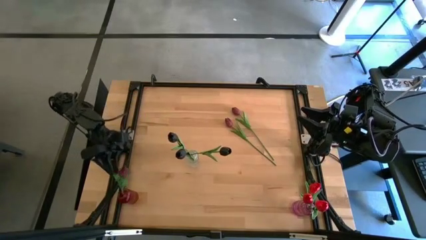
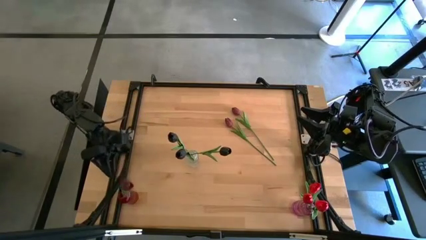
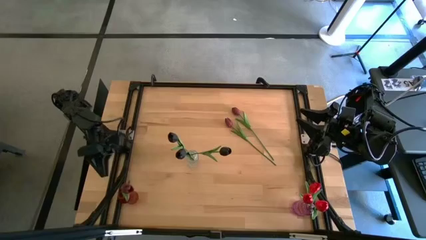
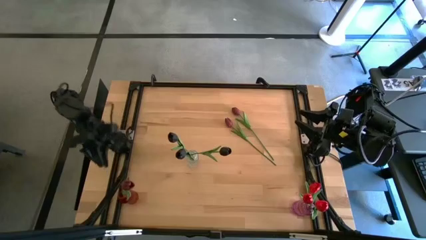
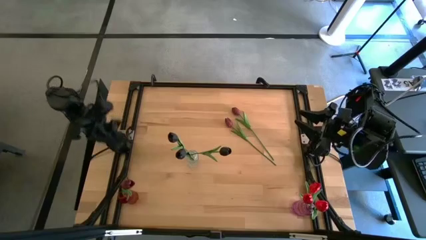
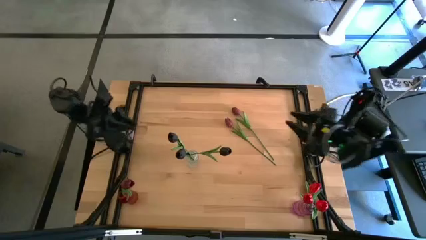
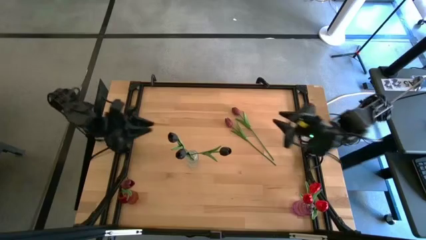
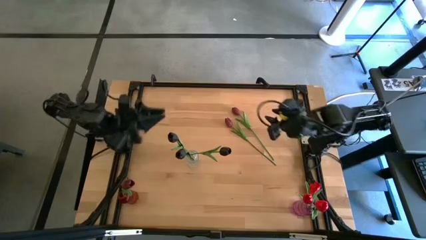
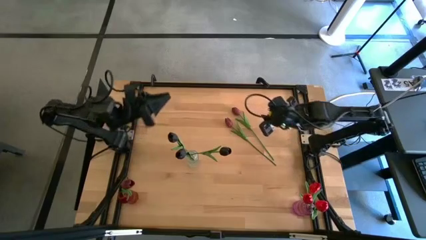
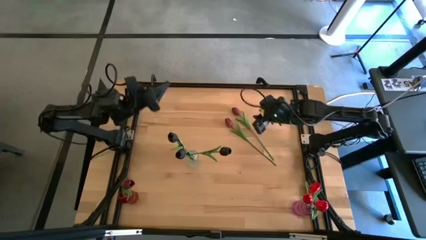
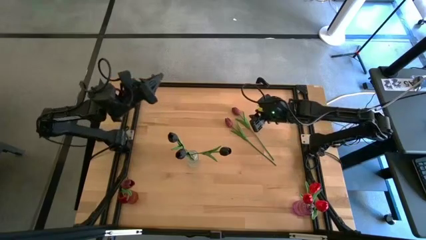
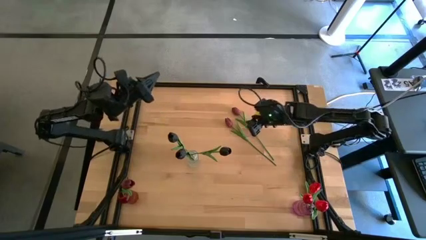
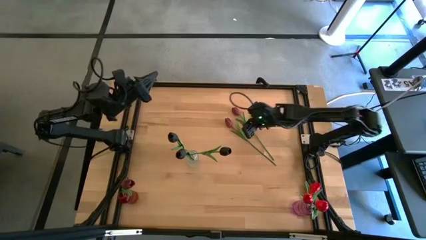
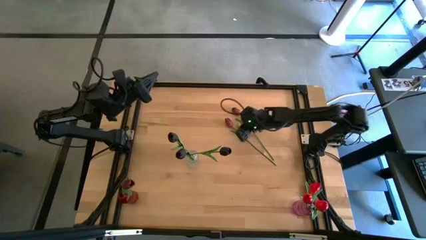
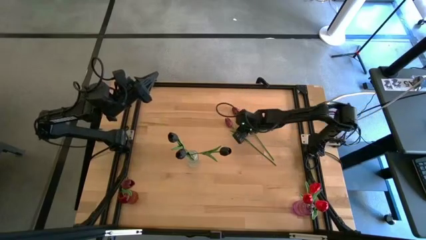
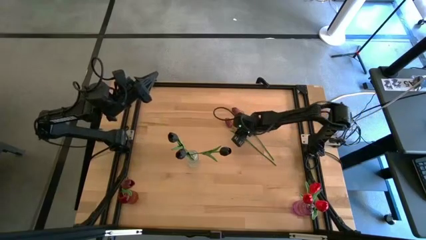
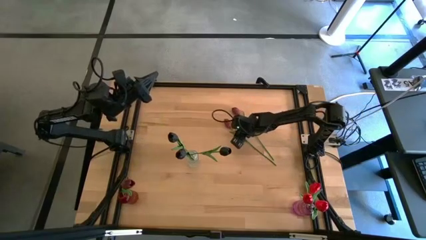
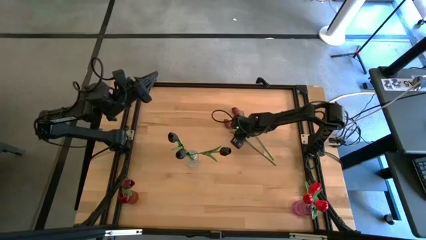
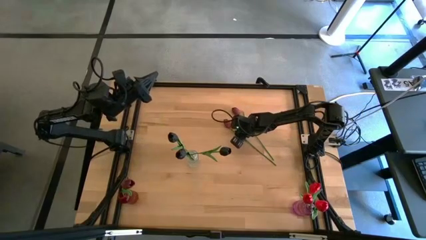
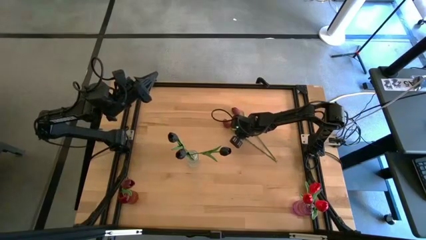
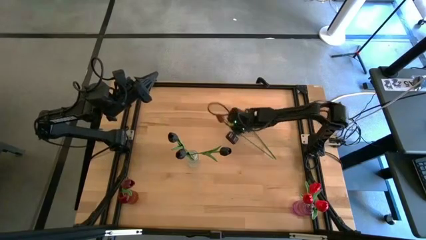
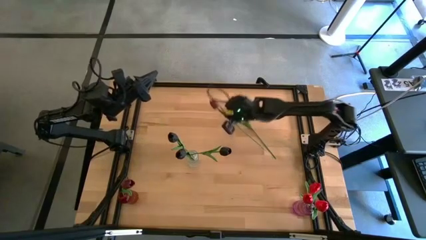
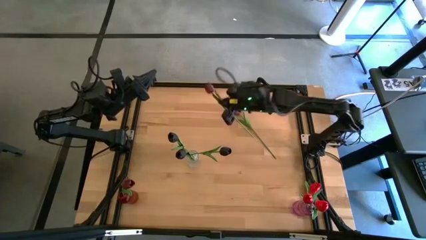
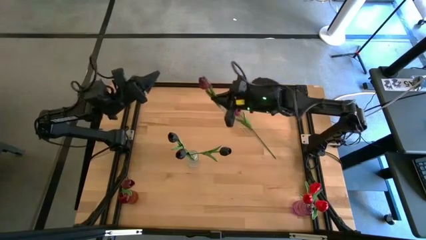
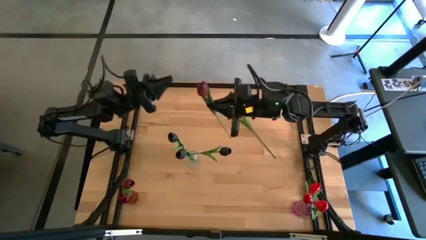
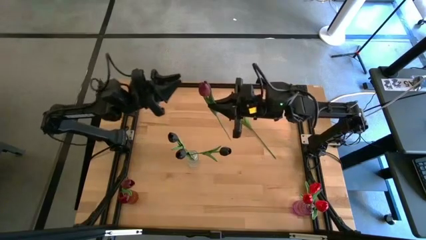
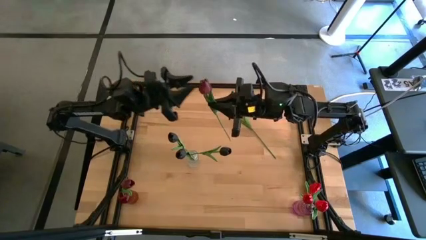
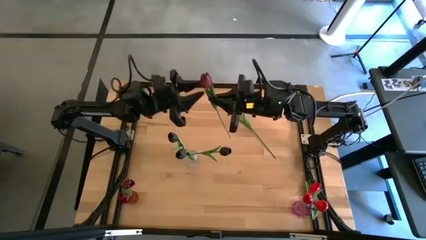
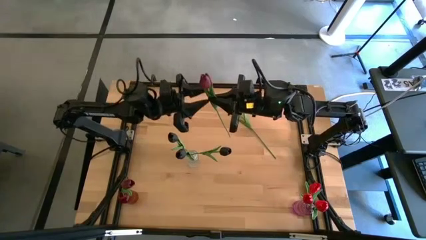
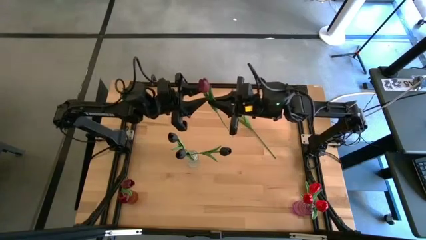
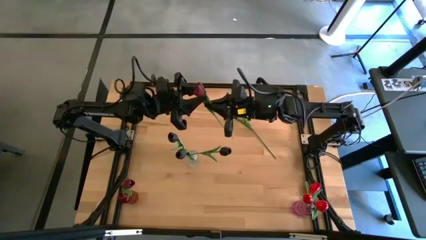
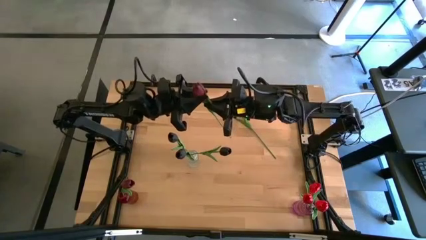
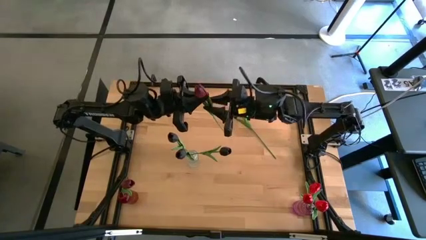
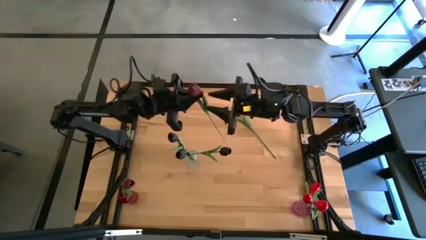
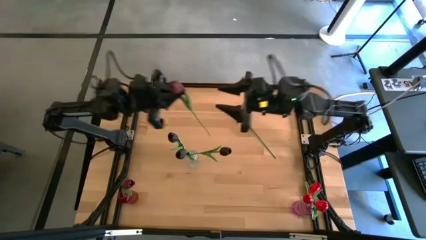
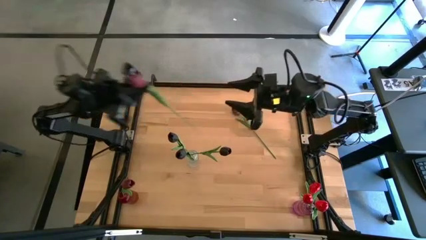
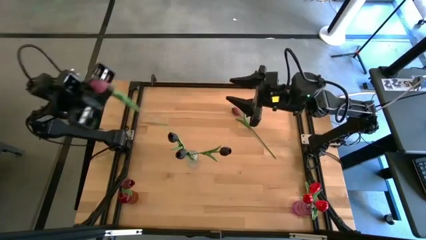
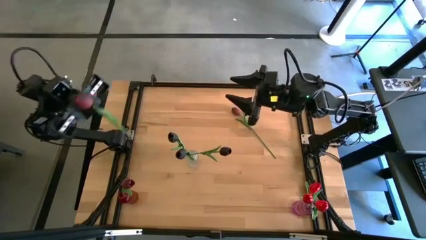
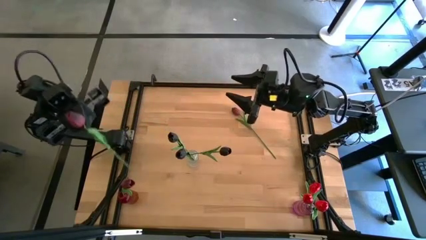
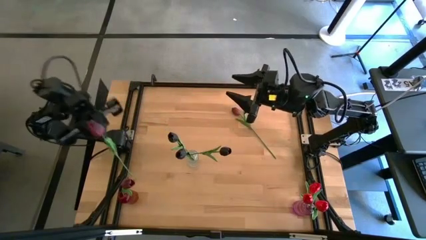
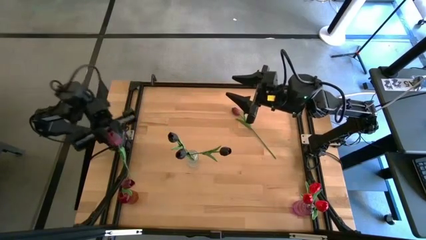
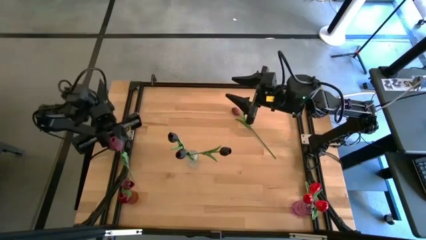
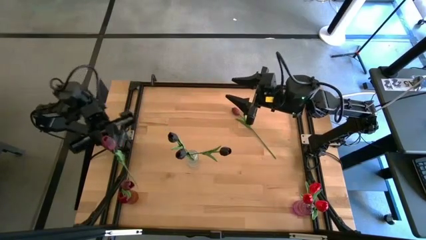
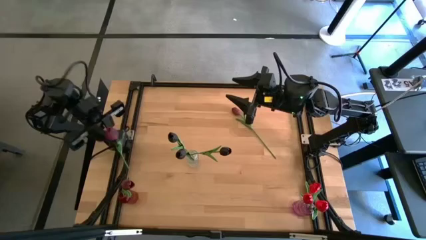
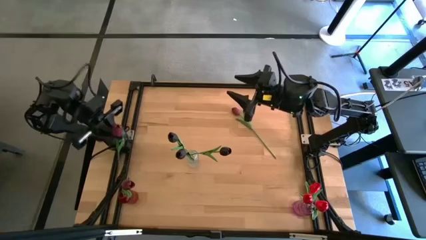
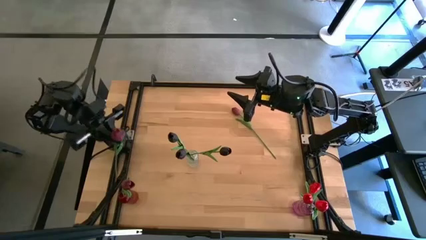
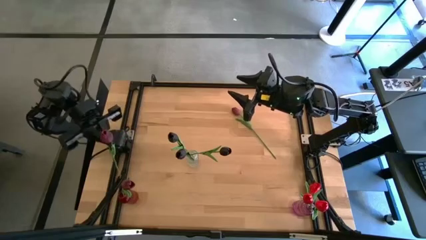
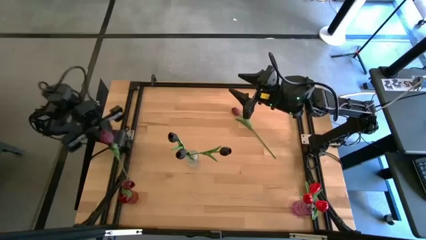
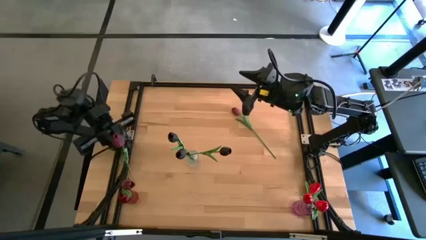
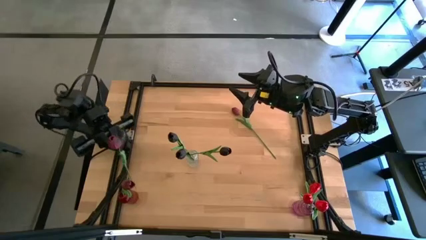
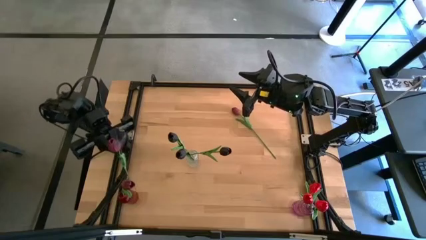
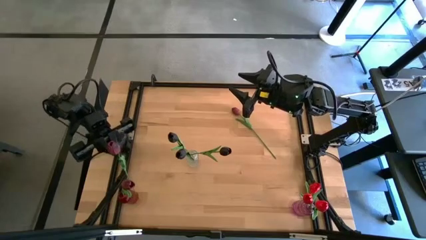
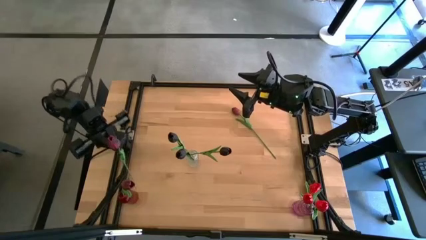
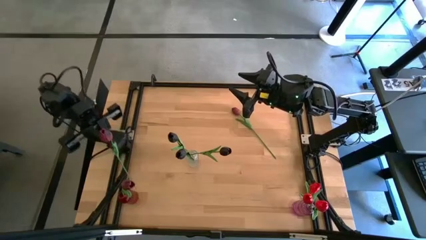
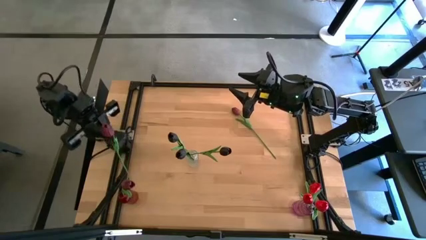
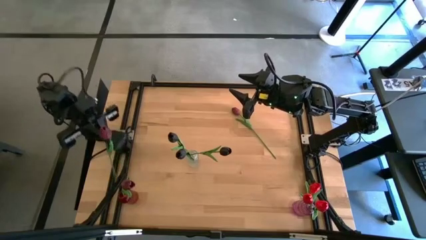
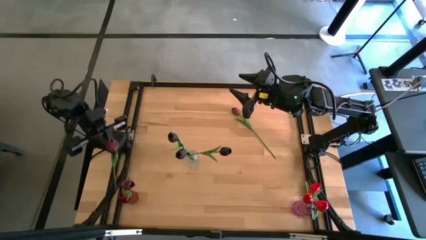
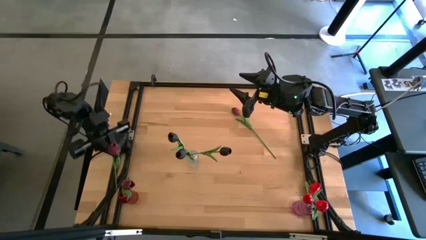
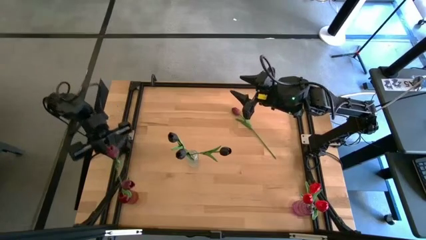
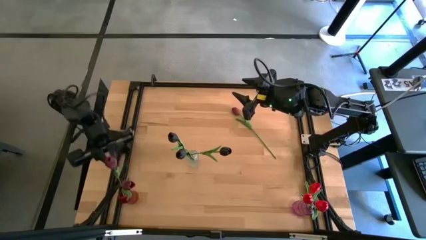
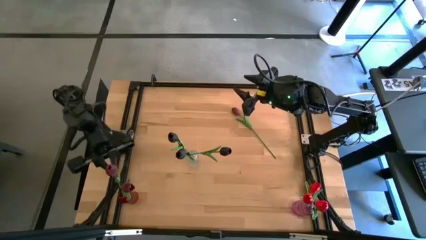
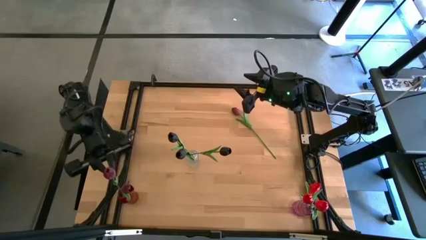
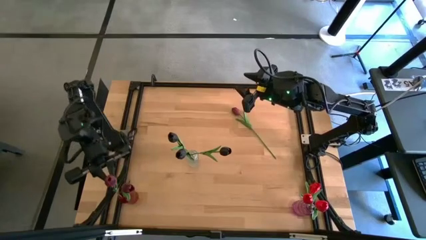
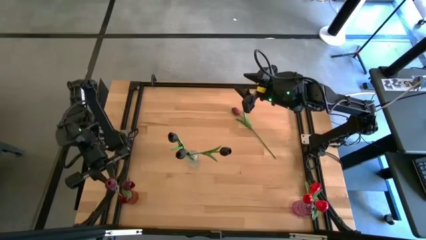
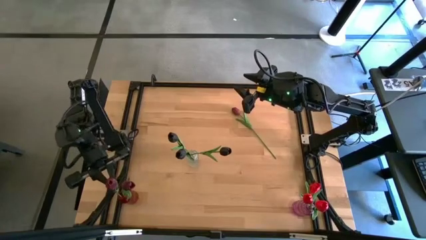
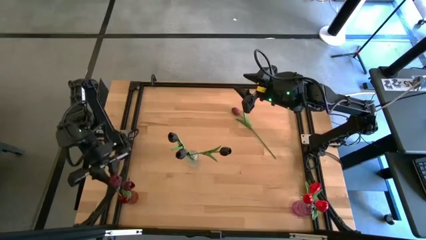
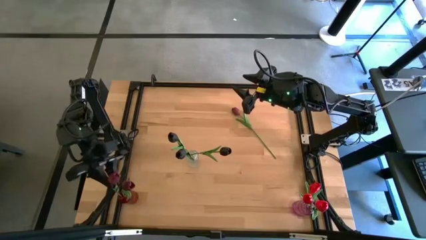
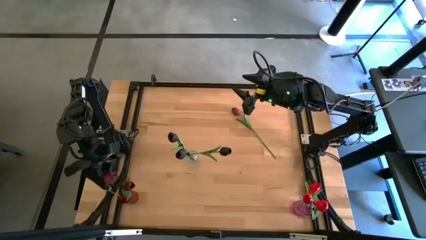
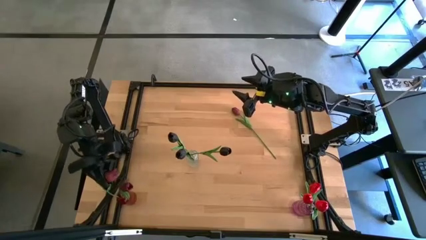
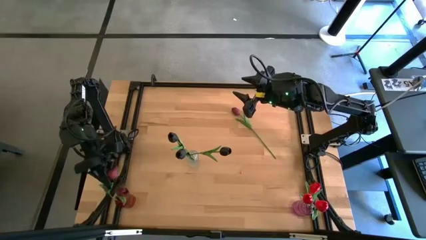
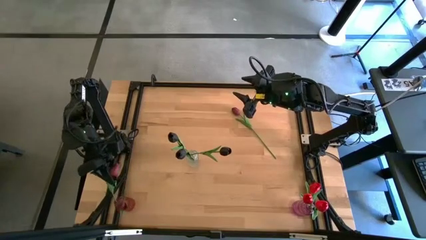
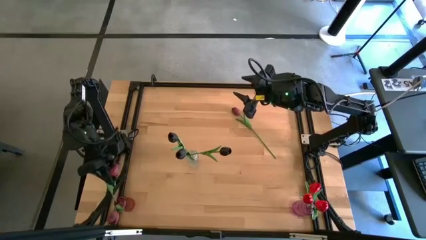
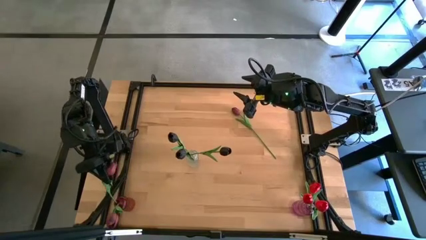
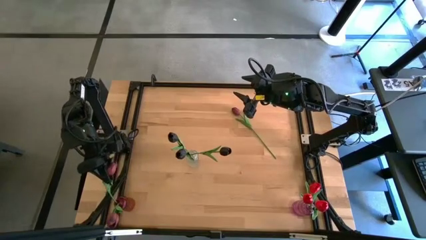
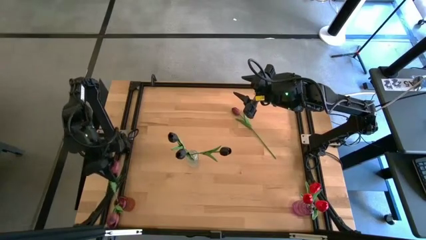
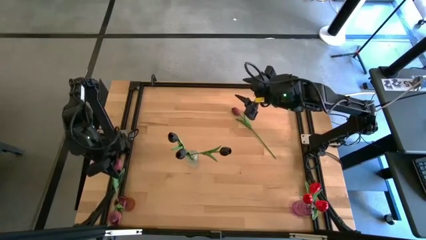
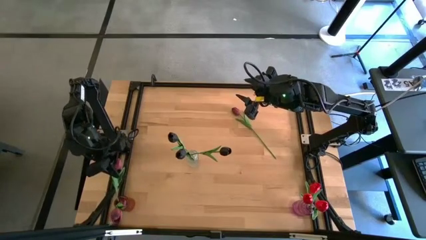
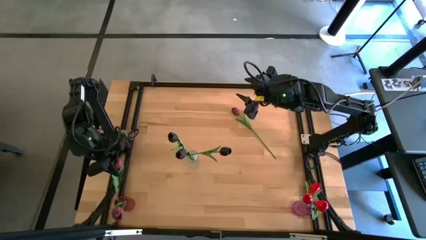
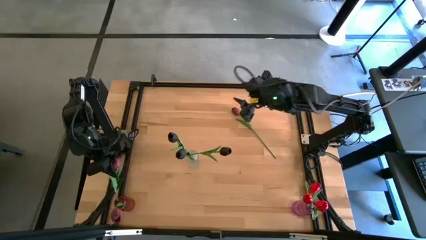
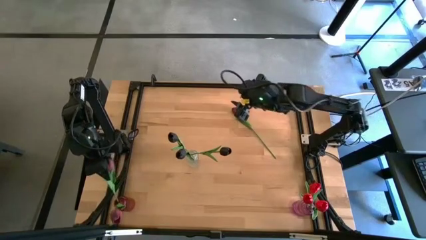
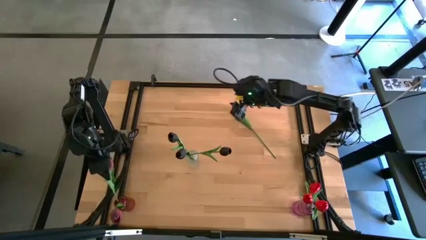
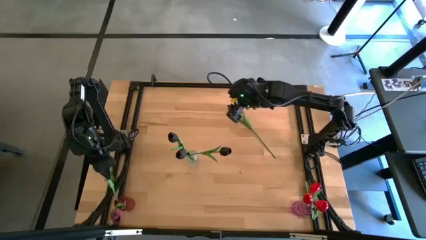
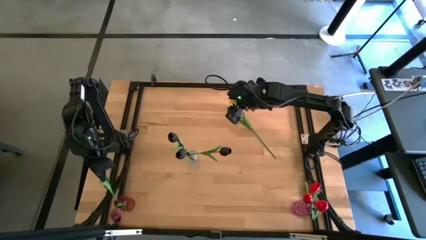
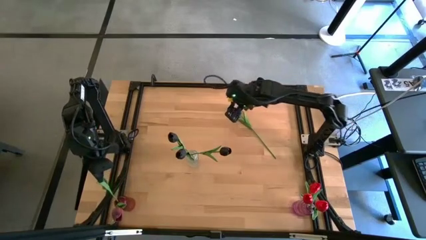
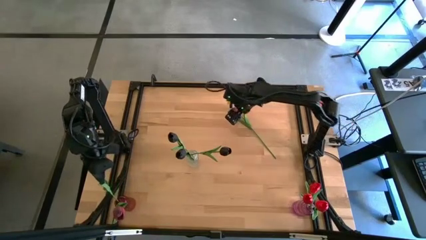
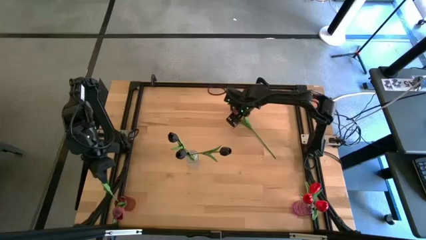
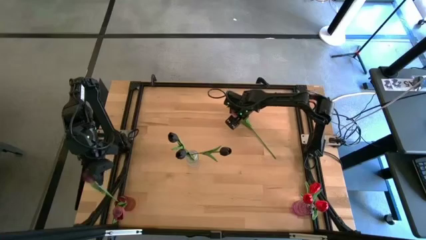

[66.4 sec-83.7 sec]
Task: Sort flowers into vase by color
Put the pink flower into the red transparent vase
